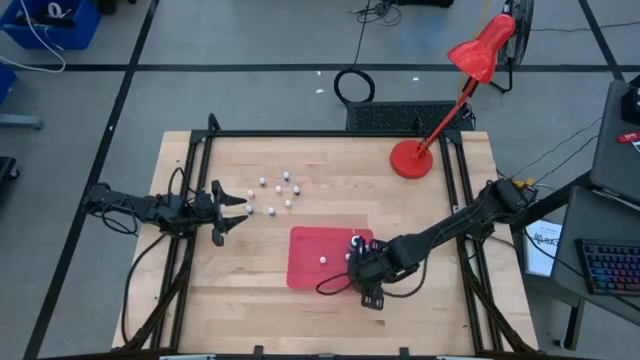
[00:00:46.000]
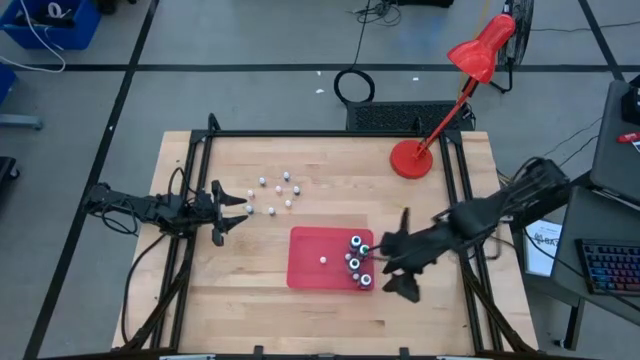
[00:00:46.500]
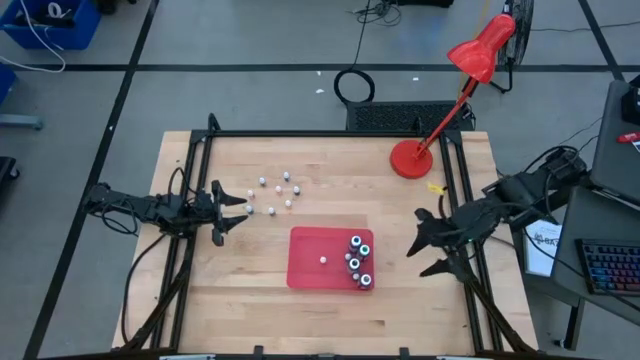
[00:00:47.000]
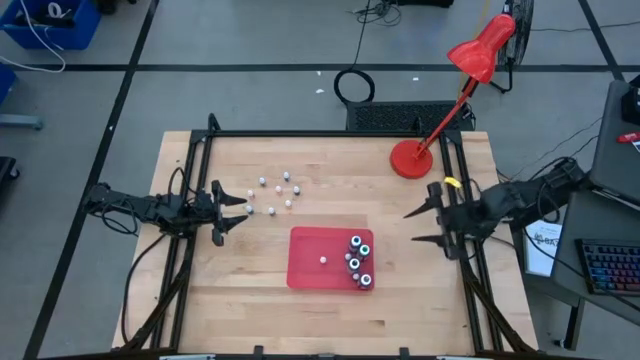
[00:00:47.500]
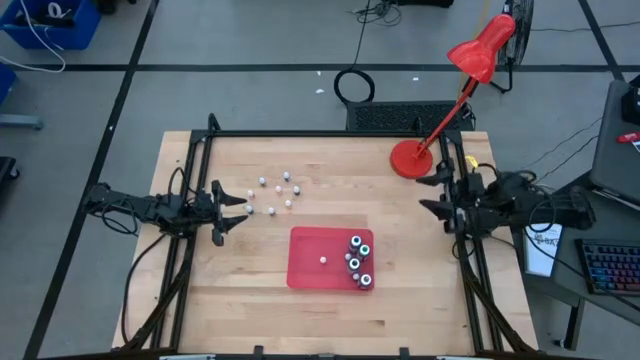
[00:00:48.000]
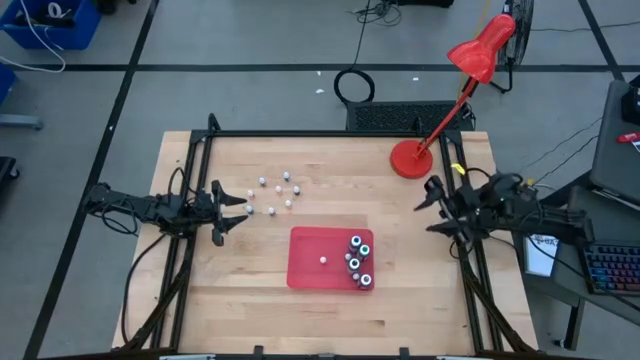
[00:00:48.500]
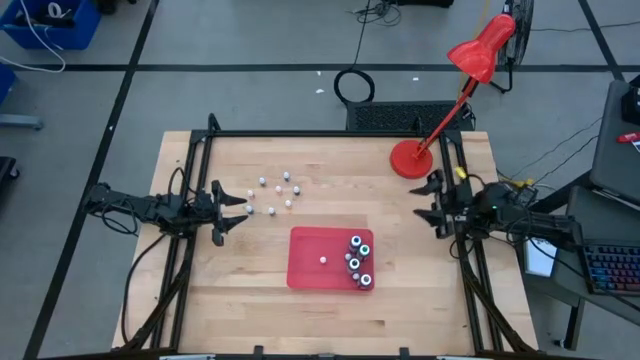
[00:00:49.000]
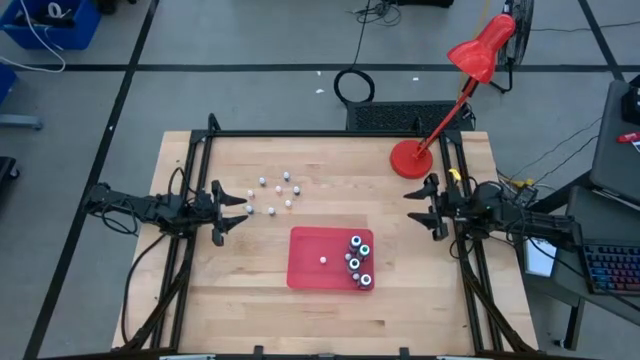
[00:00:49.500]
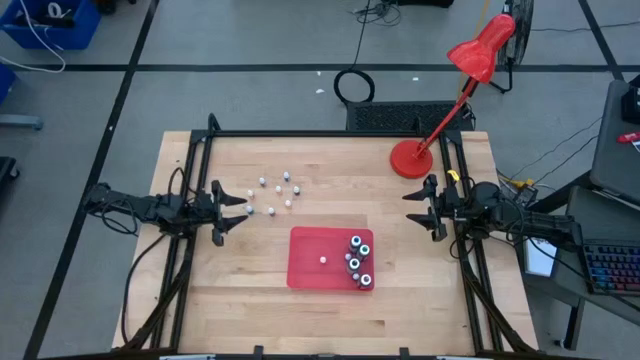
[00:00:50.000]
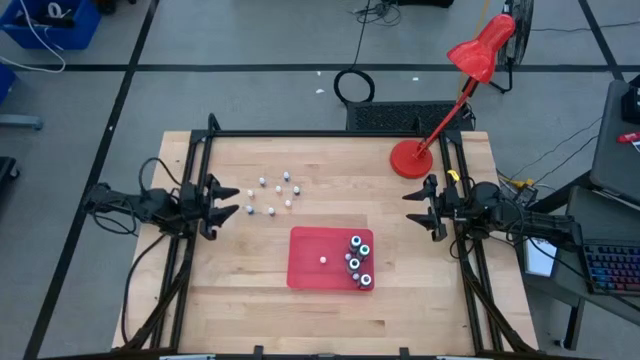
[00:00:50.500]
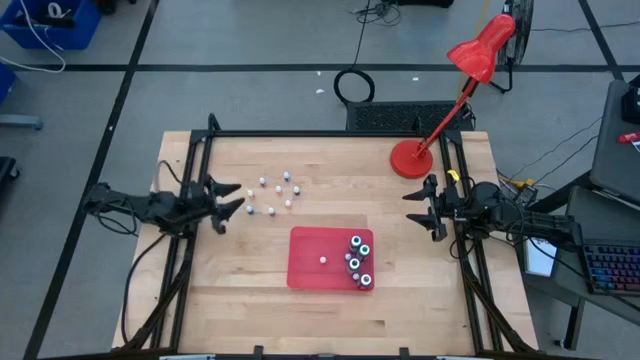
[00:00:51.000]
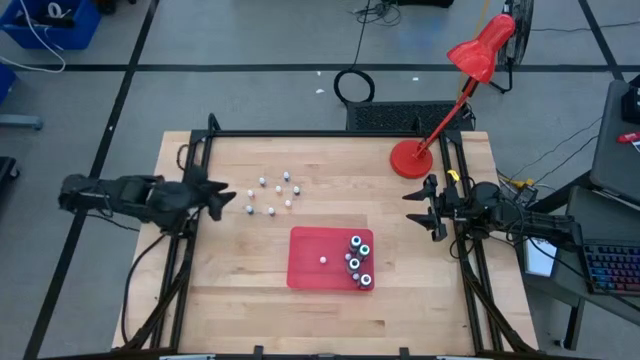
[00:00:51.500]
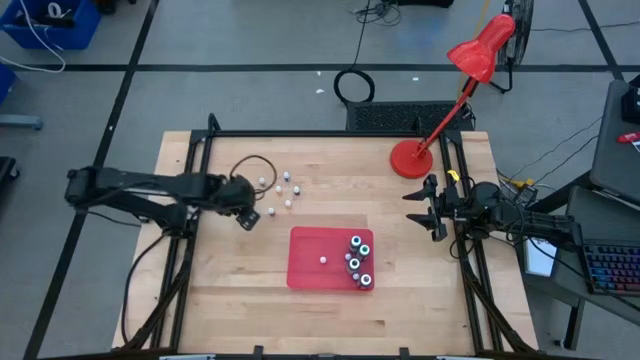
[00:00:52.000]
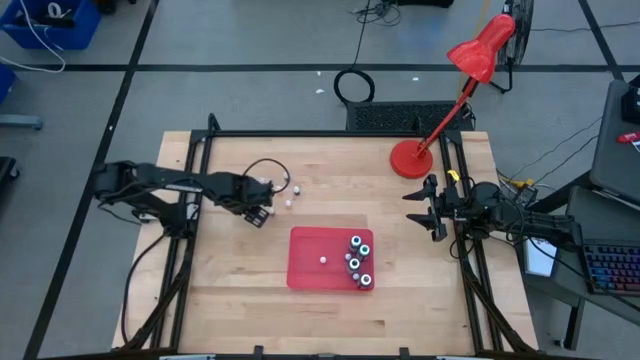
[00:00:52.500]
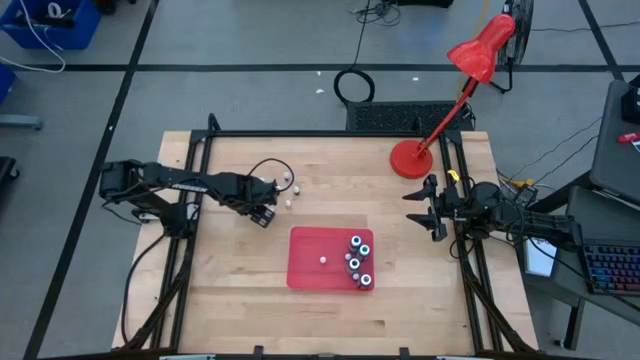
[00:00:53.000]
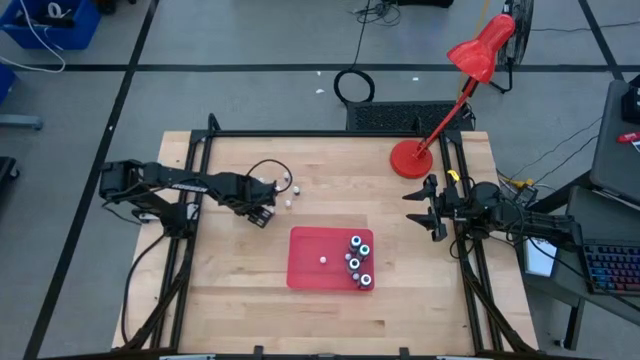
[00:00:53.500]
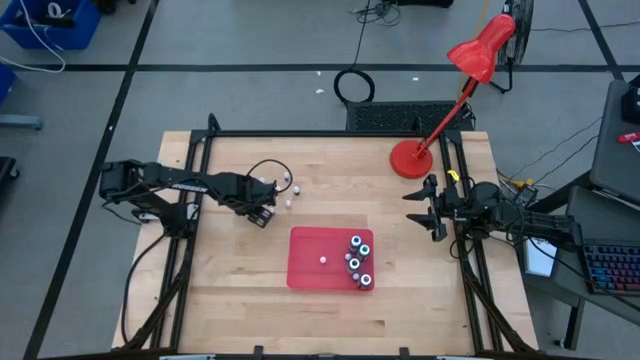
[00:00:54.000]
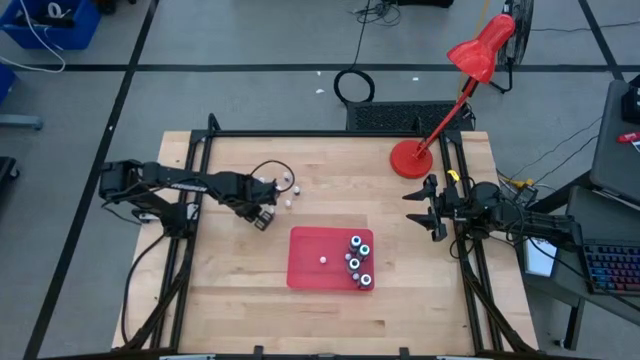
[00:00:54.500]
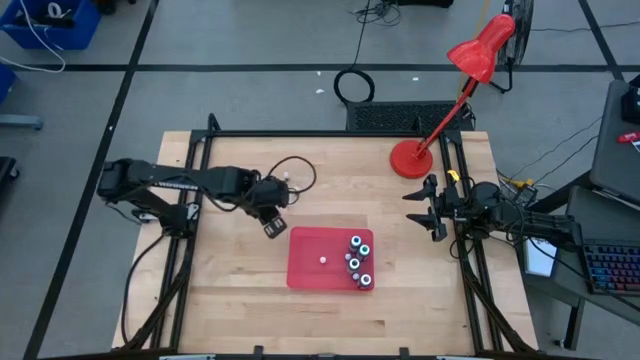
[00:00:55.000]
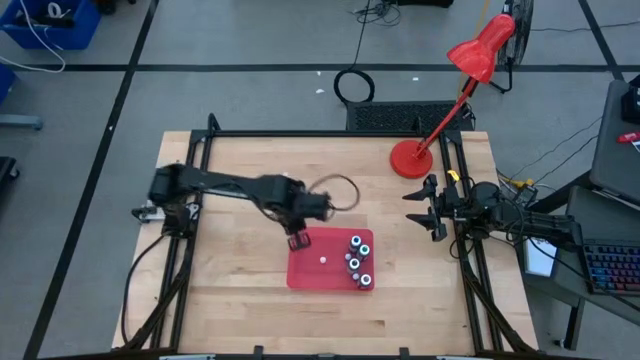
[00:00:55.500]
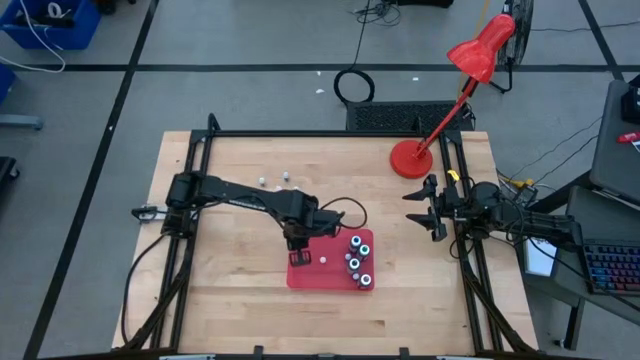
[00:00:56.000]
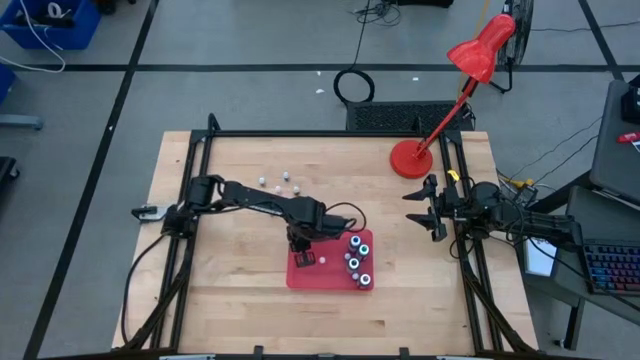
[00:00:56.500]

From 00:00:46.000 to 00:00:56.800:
Task: Pick & Place food coloring
Put the small violet food coloring bottle into the bin

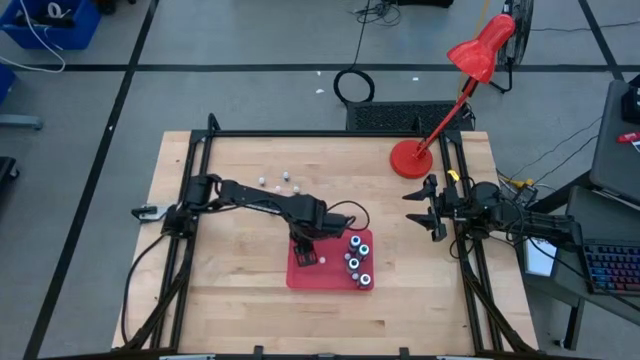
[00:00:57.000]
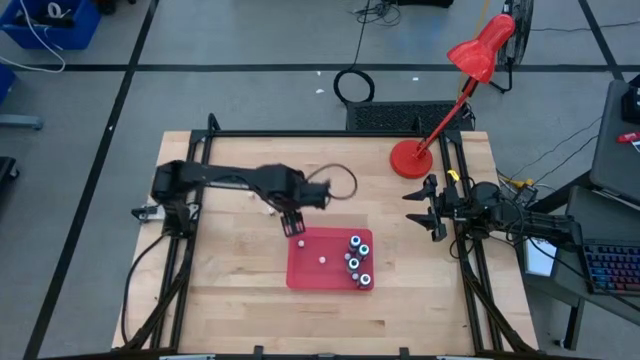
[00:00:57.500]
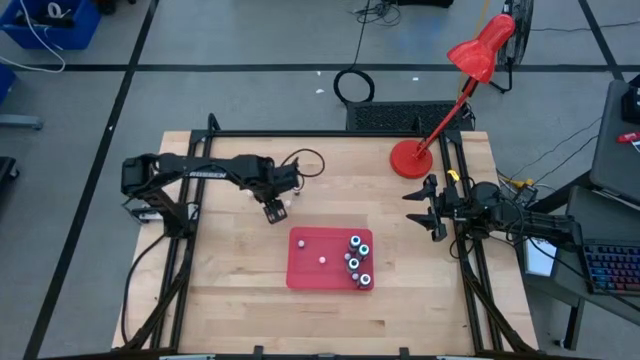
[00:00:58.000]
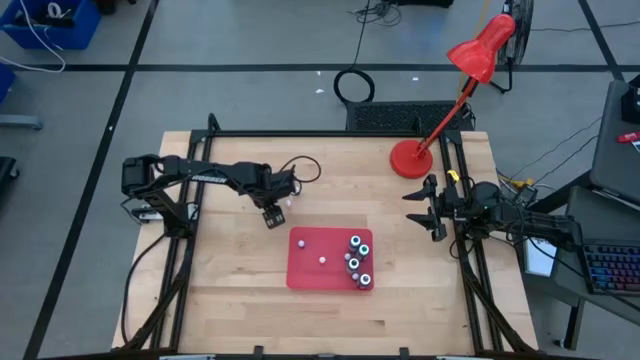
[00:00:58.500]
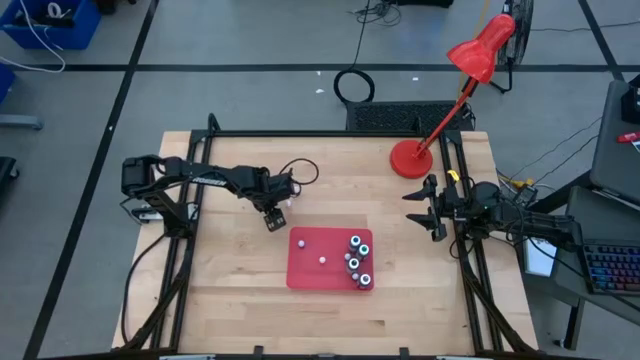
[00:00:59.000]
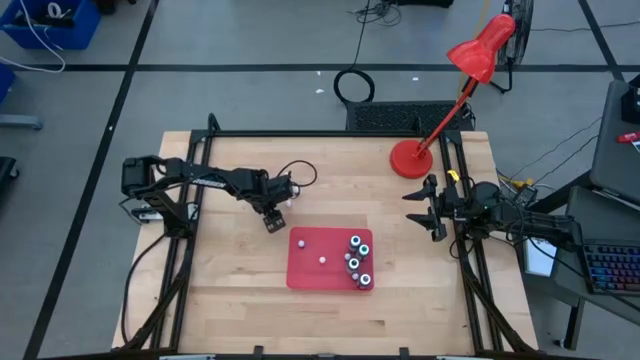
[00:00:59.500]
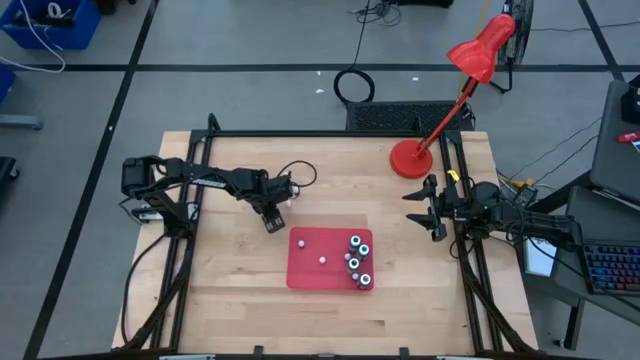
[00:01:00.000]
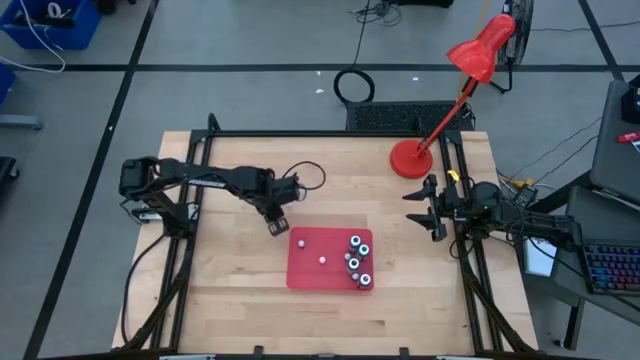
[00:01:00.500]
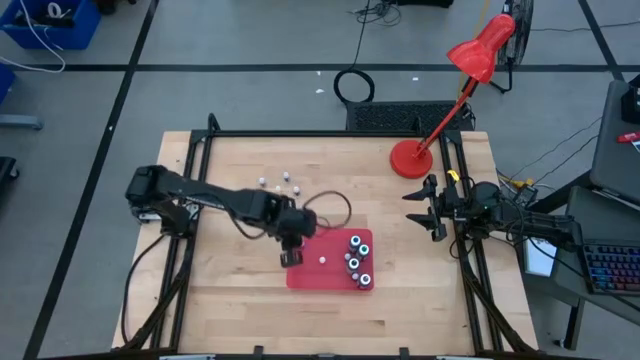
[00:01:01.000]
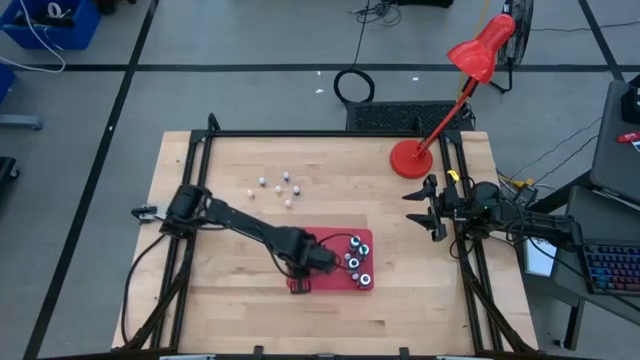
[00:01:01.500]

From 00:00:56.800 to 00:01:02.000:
Put the small brown food coloring bottle into the bin

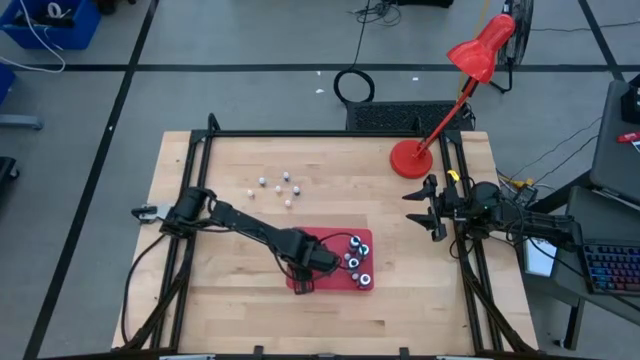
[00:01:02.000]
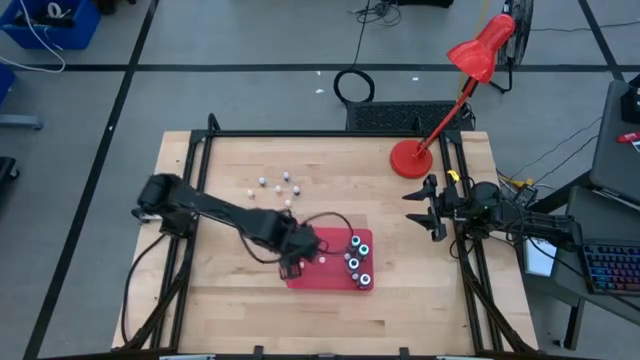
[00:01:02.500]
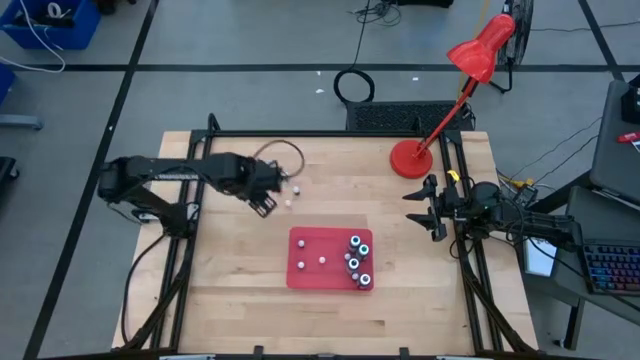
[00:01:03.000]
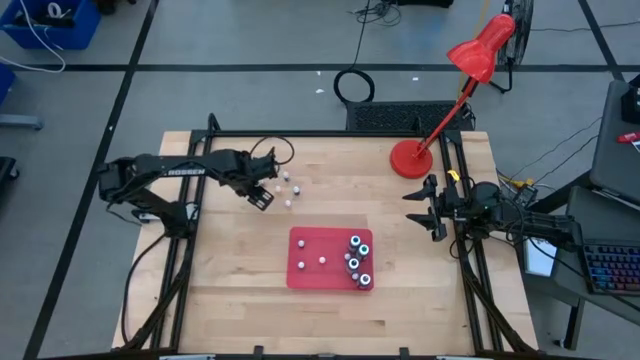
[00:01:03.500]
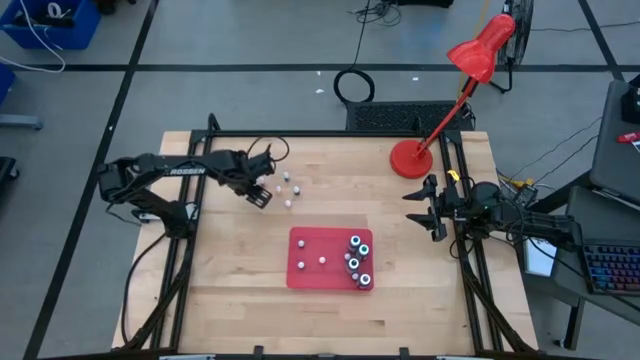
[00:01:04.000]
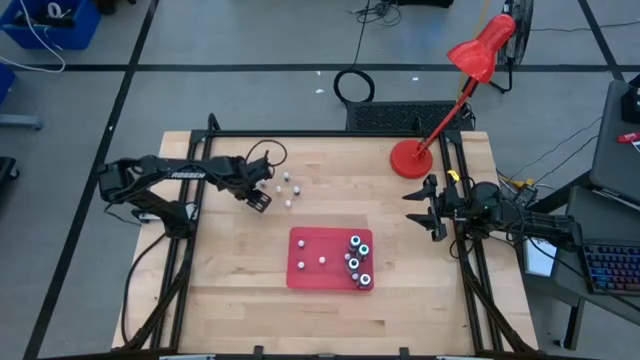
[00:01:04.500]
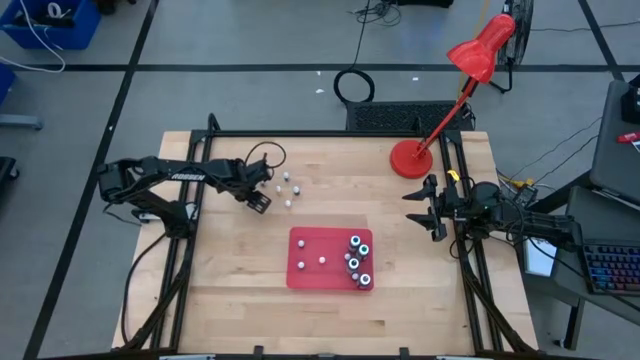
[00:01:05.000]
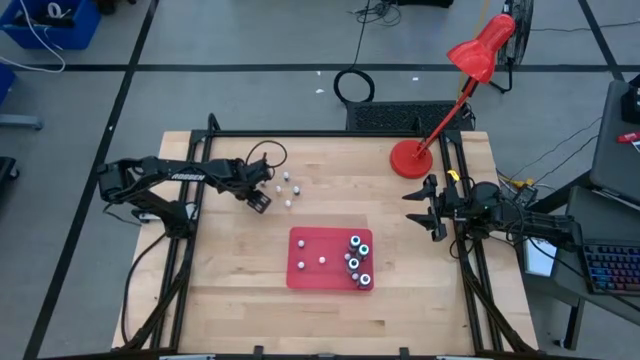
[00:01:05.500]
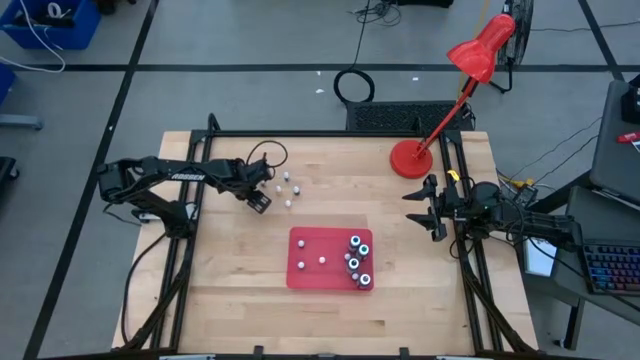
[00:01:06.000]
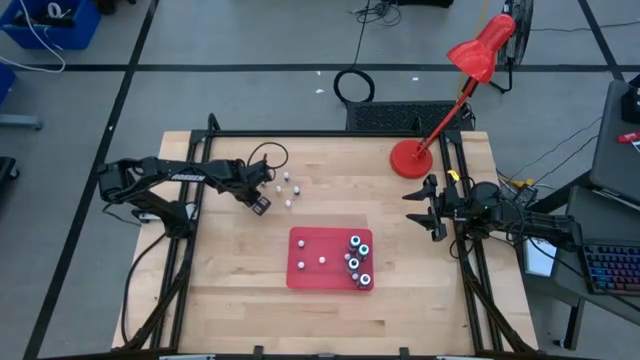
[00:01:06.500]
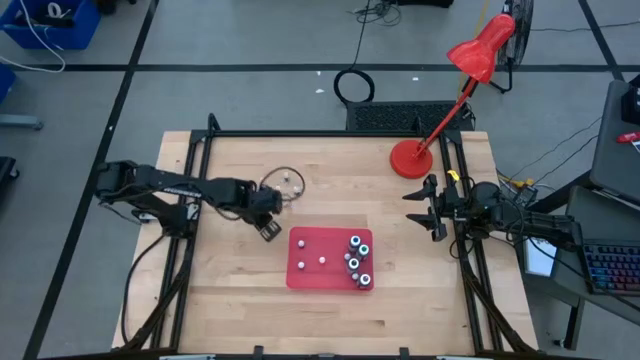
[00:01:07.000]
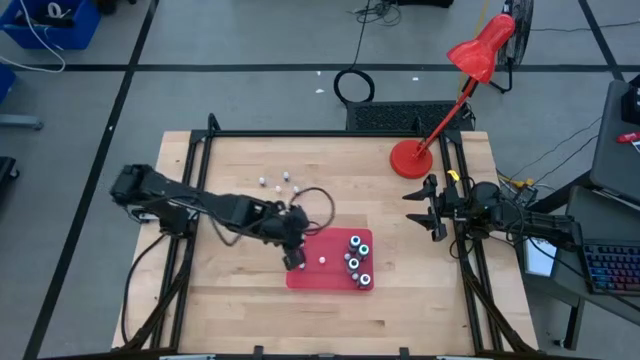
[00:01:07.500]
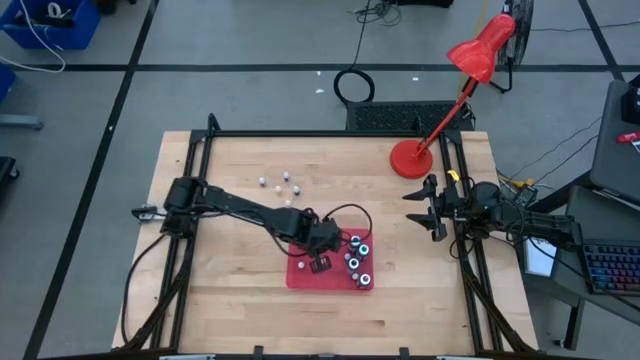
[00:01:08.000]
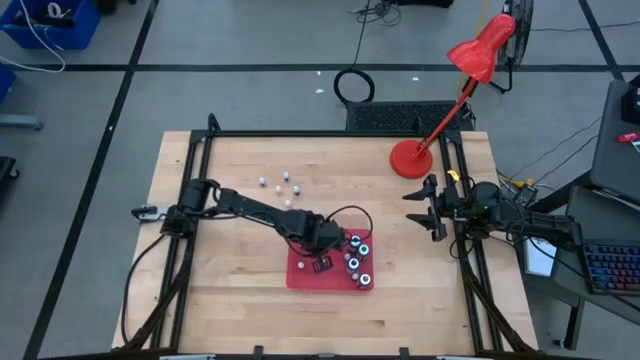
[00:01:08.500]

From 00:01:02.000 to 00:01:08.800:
Put the small orange food coloring bottle into the bin
